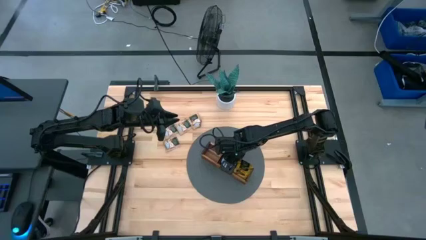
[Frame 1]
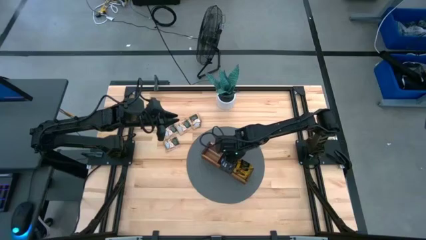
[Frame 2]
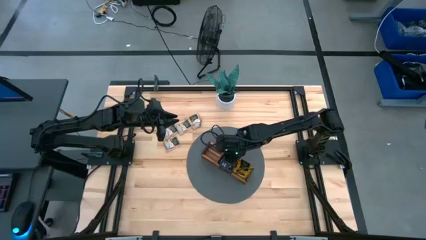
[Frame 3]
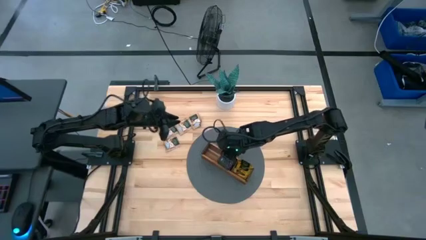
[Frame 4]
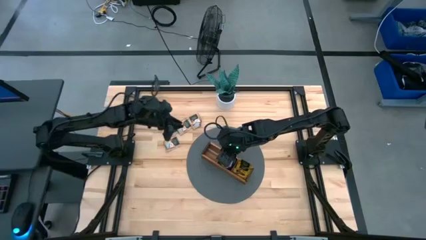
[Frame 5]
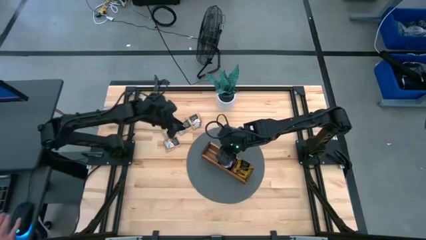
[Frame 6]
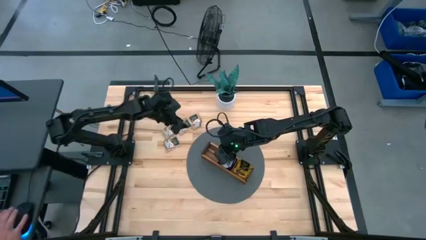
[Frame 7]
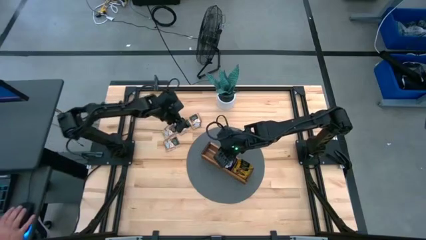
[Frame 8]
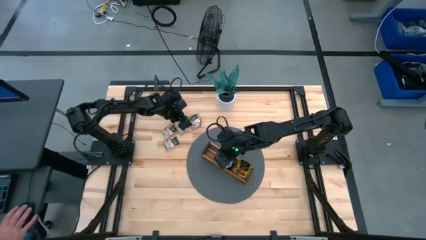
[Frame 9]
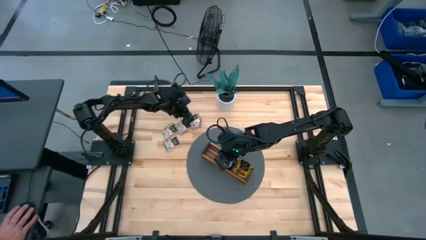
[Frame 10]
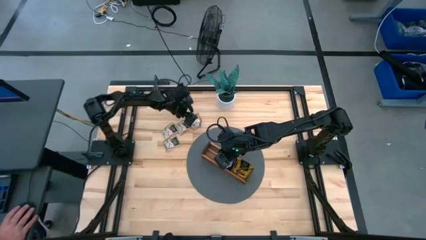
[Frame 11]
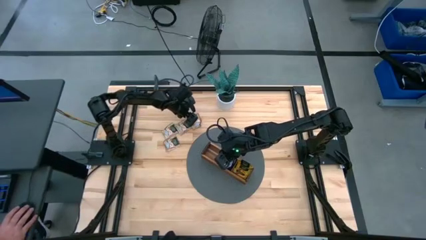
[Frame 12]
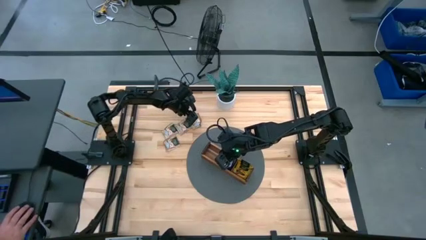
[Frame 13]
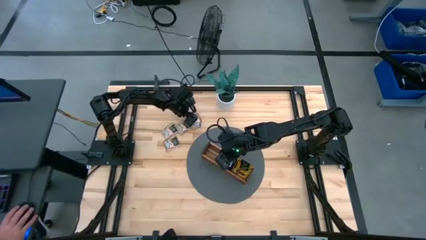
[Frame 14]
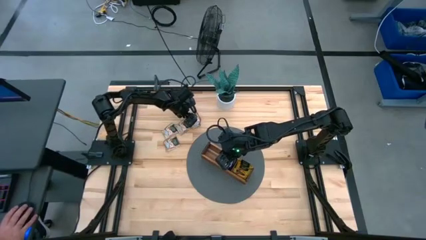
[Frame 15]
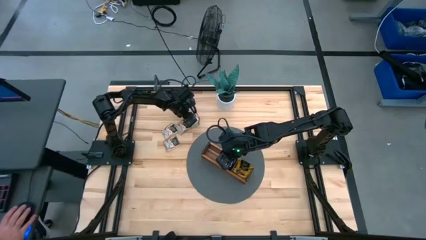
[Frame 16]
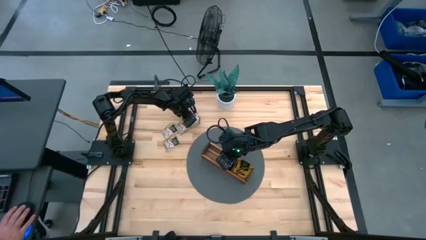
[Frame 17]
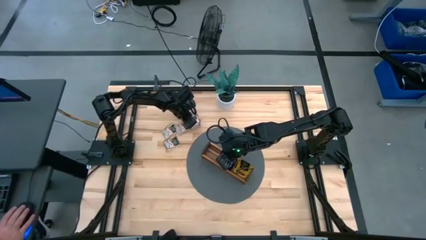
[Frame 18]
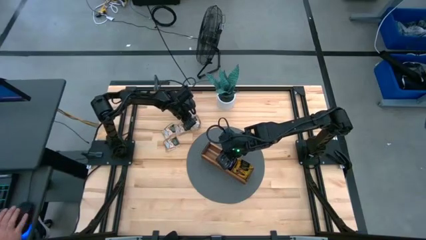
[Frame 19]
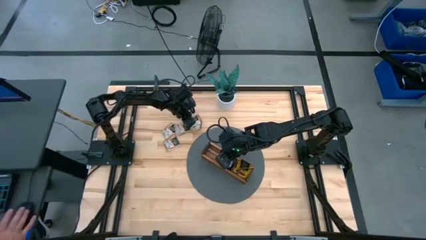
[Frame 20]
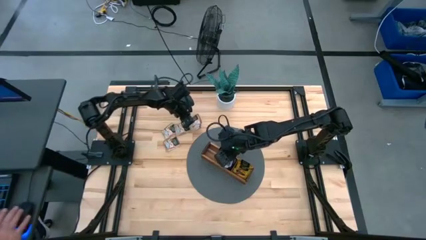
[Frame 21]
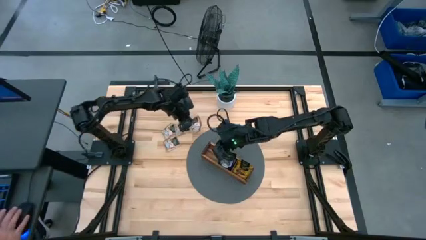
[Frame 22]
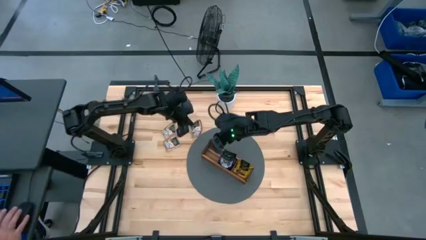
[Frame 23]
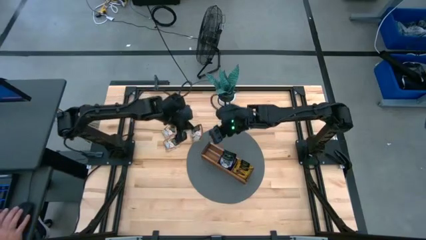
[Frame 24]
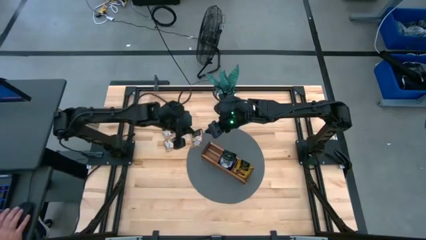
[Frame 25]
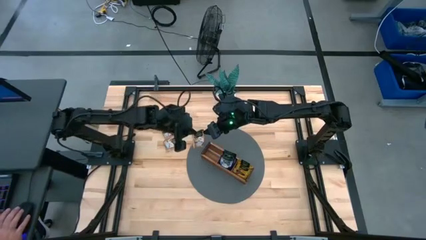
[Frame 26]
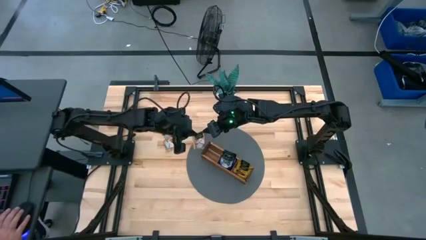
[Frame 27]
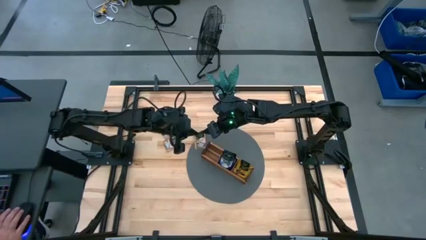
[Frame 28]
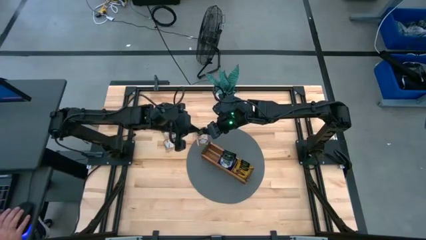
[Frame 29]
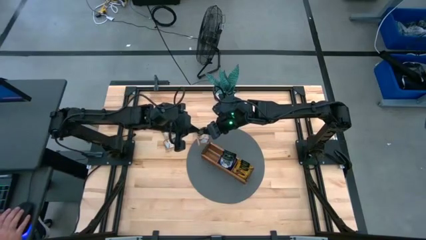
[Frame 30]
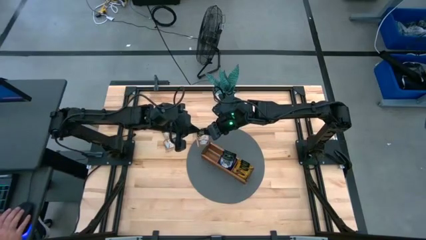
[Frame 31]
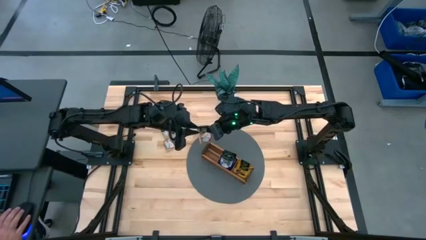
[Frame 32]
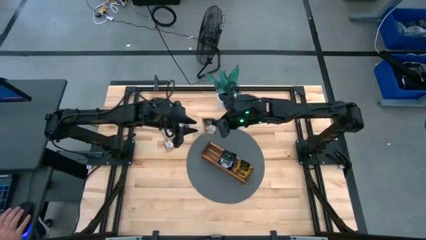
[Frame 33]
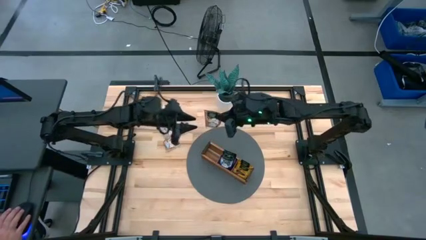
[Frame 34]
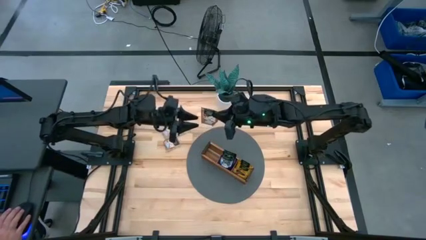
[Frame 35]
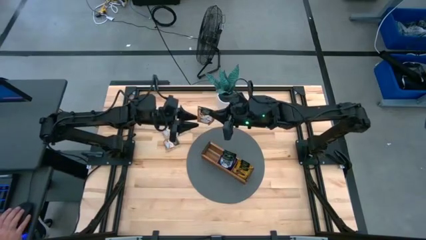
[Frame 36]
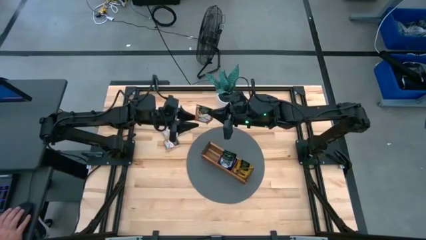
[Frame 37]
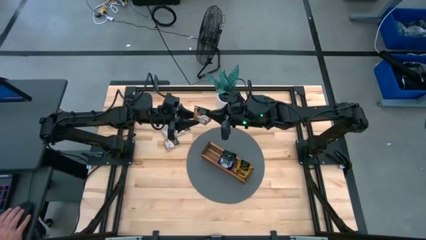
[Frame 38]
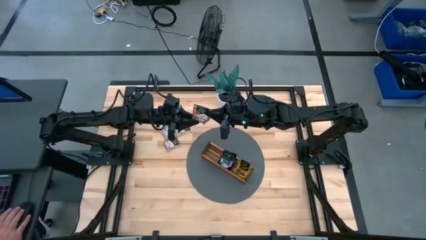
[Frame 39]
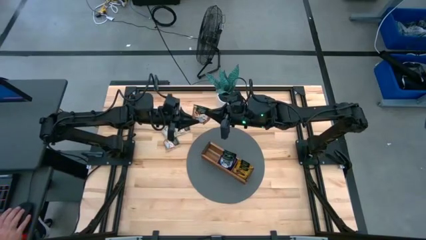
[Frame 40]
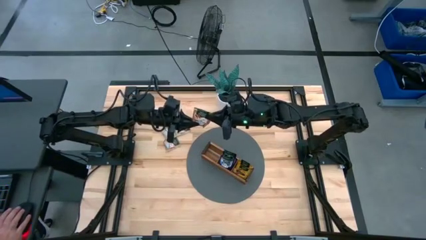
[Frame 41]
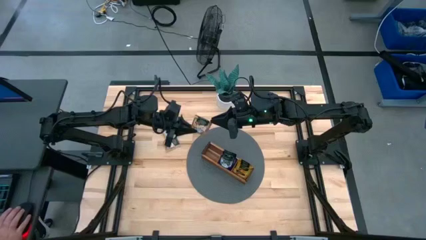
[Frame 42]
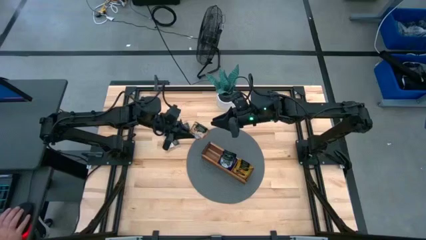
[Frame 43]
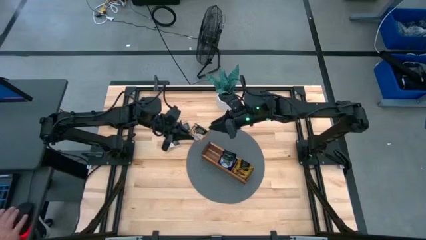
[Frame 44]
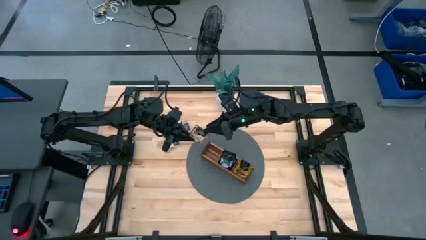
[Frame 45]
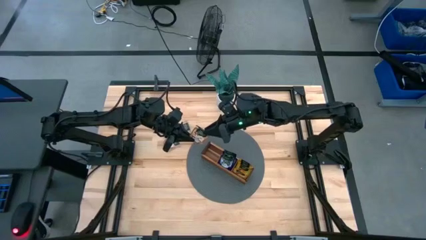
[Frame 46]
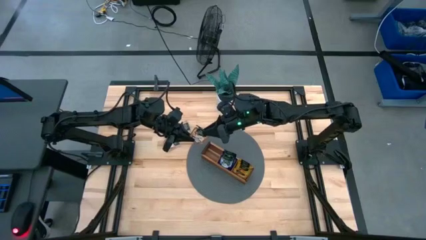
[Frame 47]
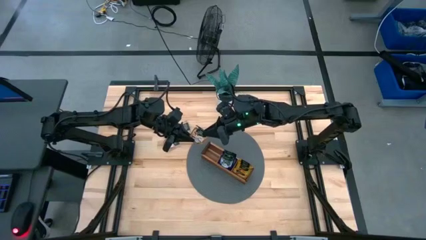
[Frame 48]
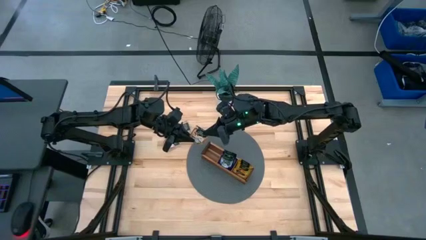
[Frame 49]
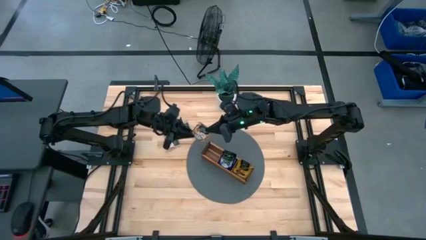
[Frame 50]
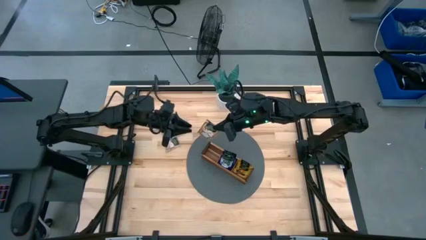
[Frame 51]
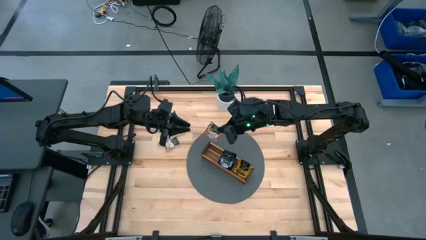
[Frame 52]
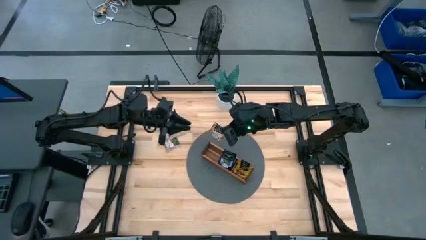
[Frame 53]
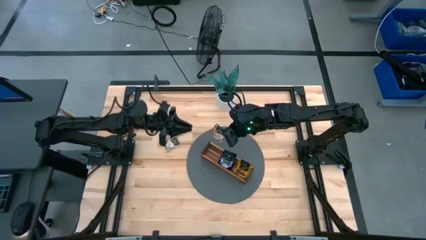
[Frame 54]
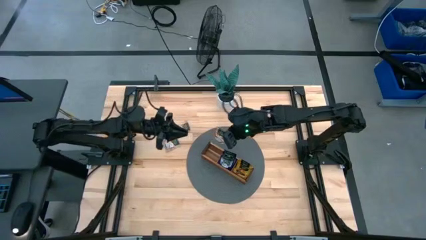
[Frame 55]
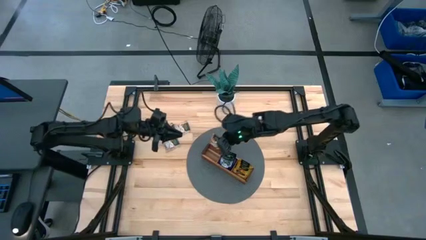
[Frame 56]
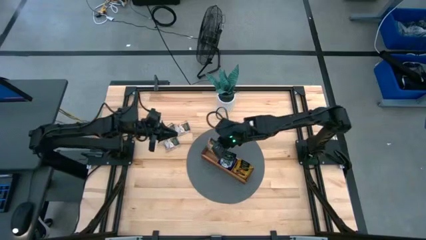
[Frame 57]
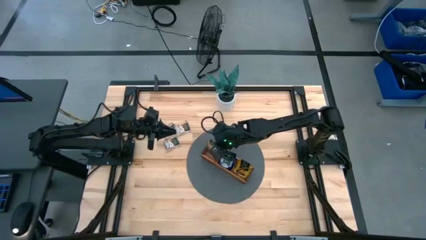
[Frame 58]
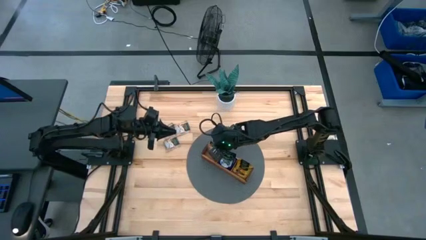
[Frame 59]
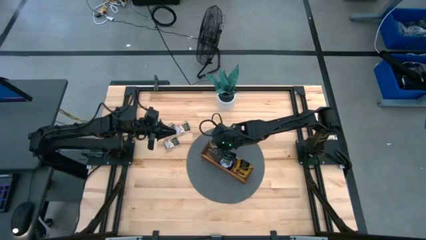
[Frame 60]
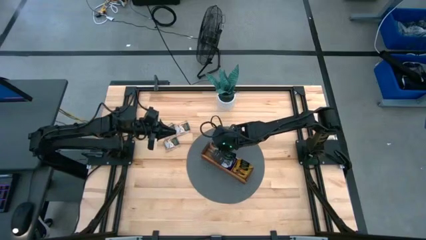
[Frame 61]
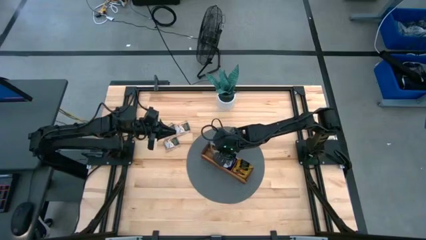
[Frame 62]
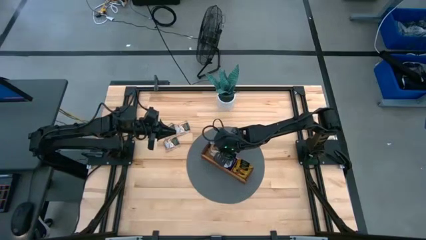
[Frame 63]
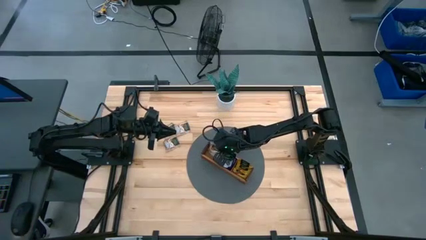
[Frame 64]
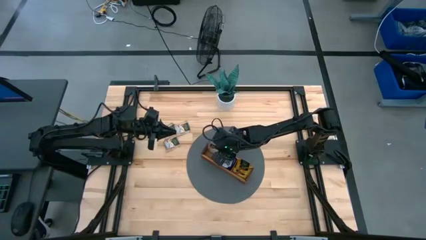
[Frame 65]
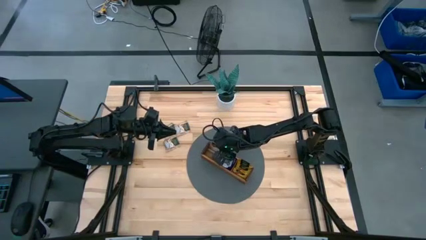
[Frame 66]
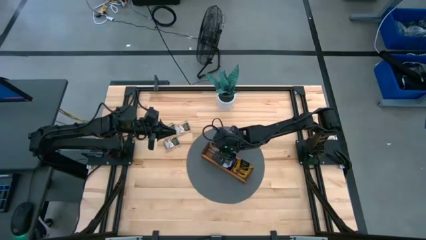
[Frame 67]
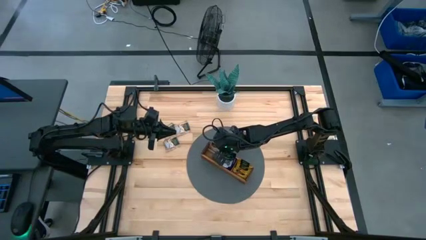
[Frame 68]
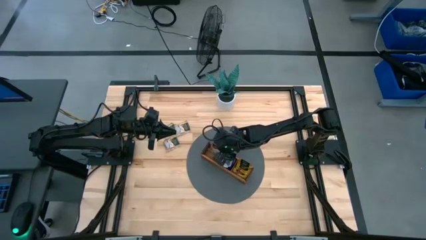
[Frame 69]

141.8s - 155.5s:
Task: Pick & Place Tea
Put the brown tea bag into the left section of the wooden organizer

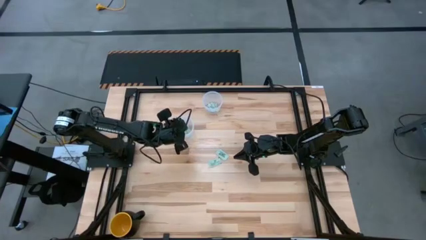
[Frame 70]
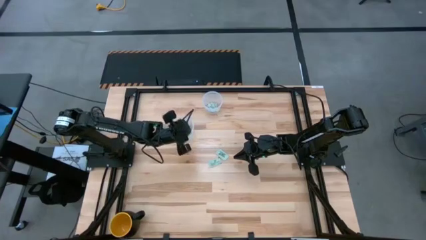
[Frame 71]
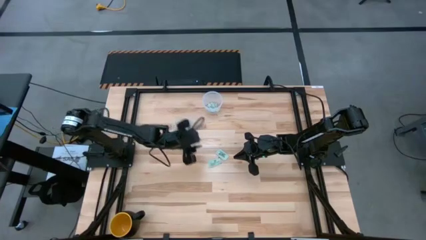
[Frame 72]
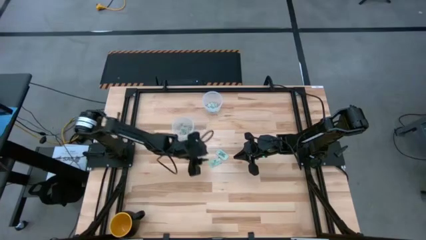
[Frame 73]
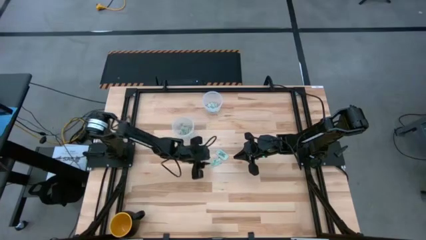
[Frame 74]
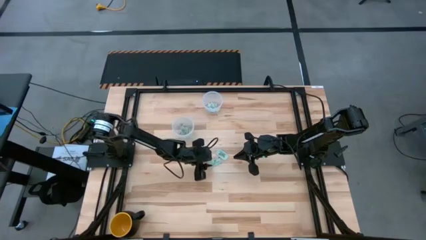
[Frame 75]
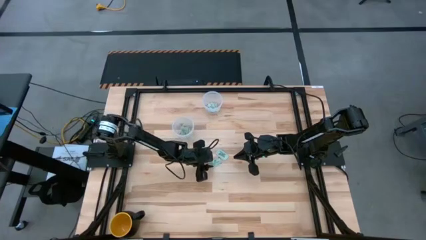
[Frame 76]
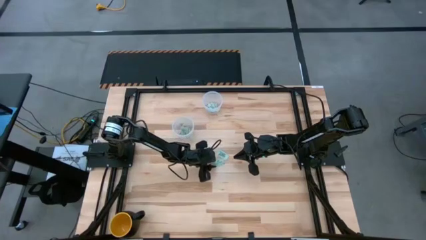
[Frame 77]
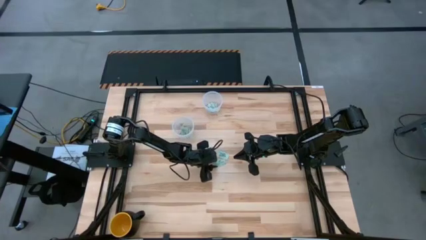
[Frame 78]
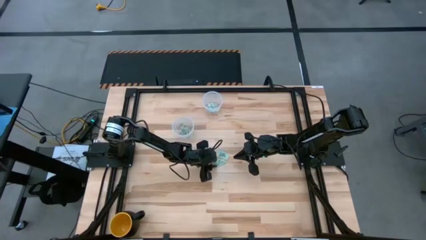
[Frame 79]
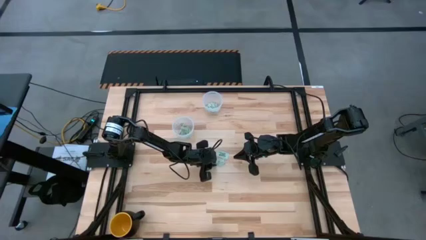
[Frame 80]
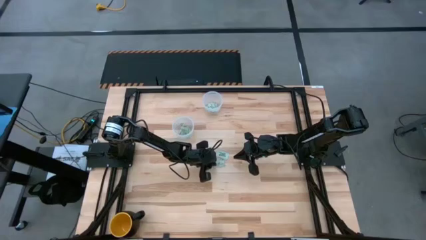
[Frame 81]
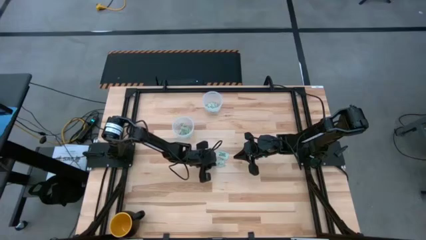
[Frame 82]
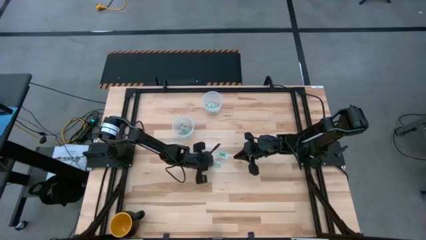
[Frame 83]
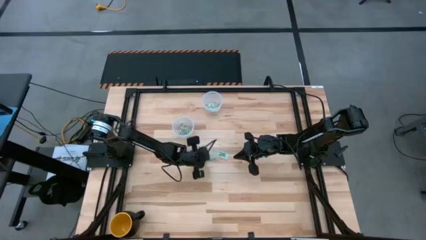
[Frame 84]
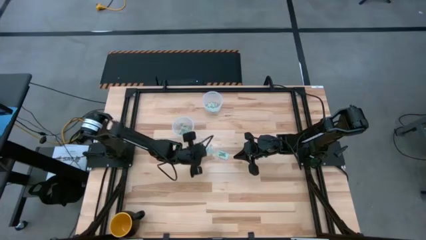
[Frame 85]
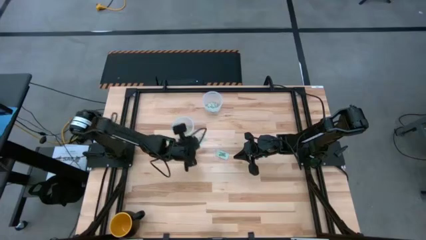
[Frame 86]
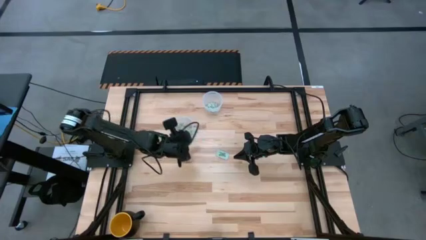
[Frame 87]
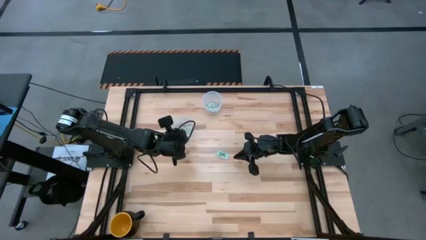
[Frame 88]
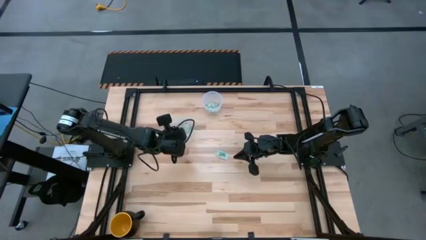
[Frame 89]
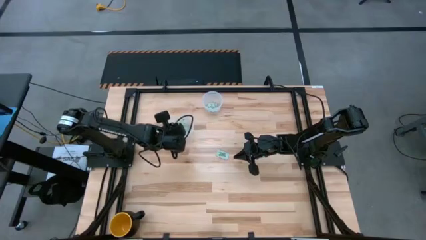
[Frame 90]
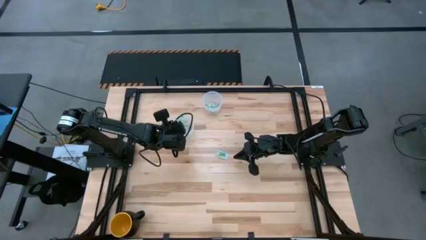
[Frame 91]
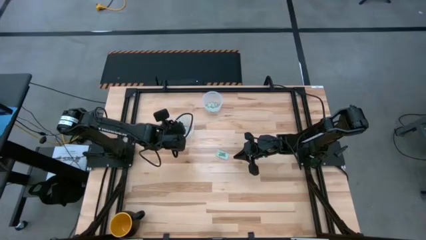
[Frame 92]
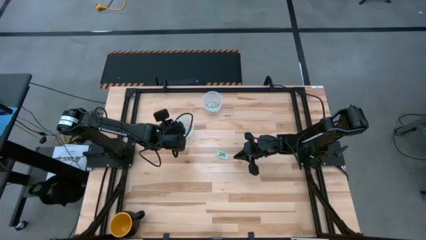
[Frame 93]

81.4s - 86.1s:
Task: Pick and place items into bin
Put the stevia packet into the bottom transparent bin
